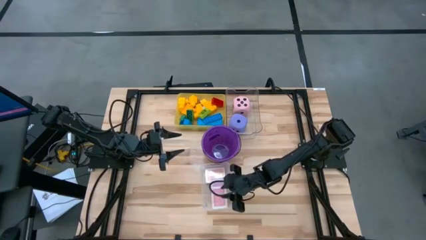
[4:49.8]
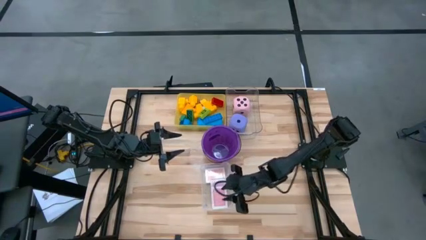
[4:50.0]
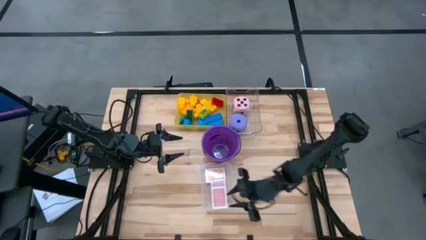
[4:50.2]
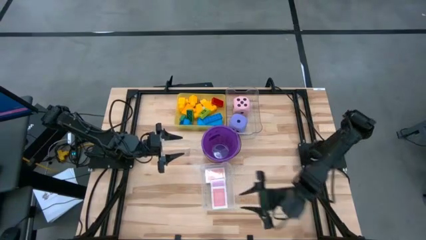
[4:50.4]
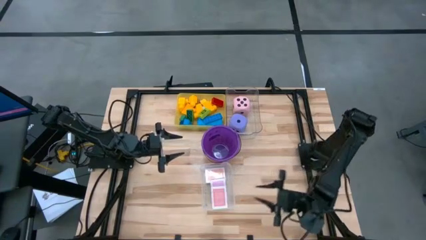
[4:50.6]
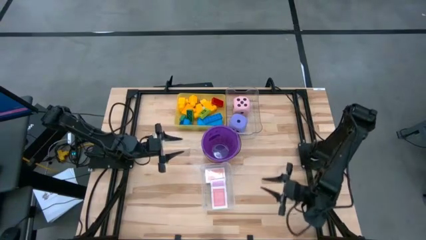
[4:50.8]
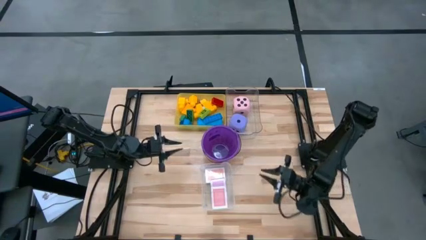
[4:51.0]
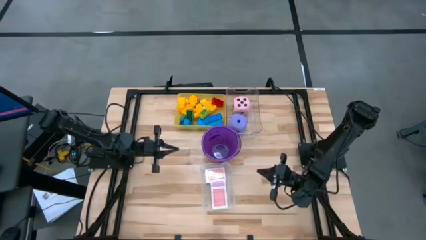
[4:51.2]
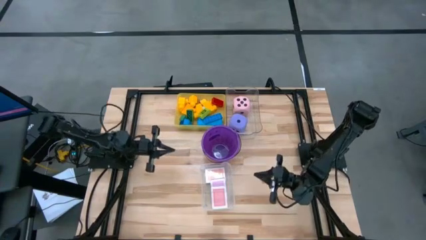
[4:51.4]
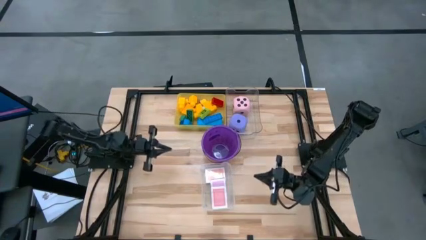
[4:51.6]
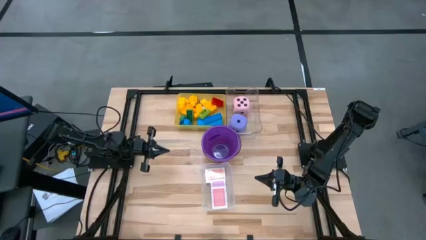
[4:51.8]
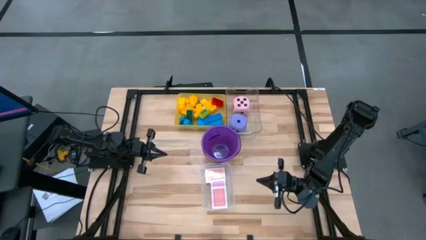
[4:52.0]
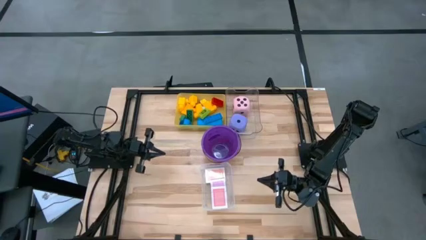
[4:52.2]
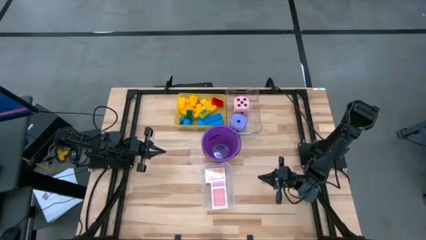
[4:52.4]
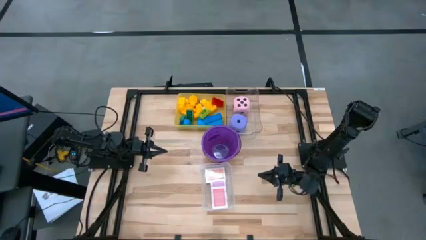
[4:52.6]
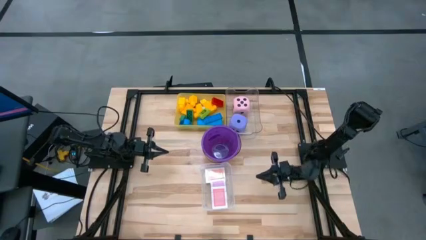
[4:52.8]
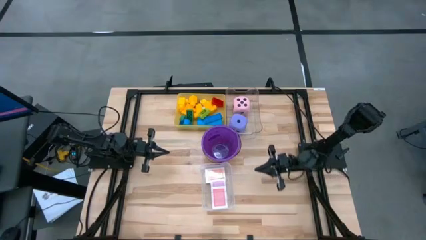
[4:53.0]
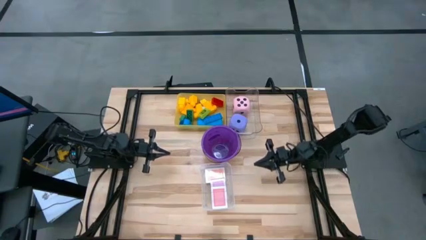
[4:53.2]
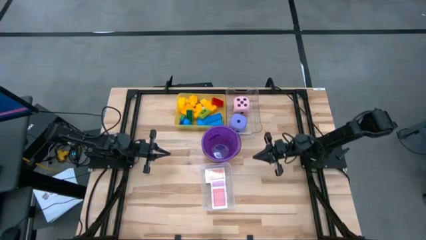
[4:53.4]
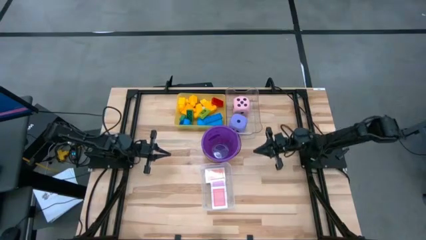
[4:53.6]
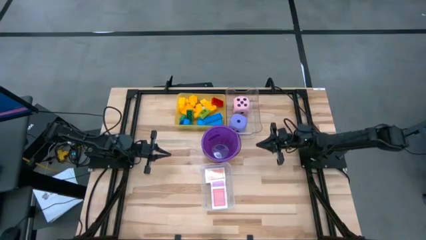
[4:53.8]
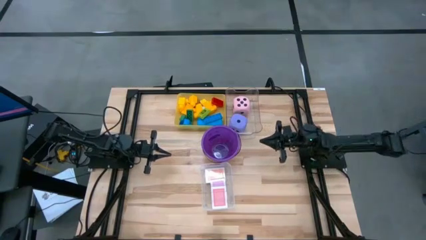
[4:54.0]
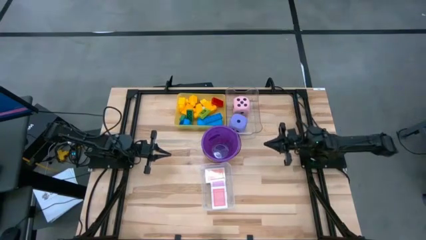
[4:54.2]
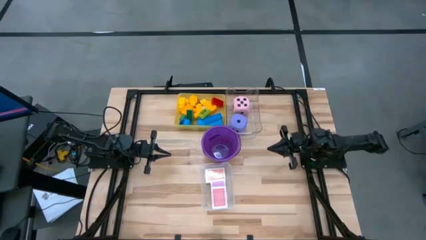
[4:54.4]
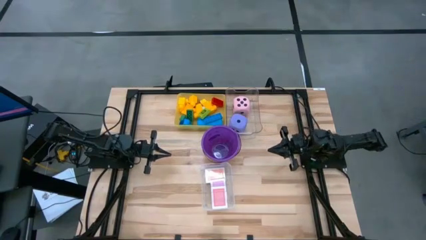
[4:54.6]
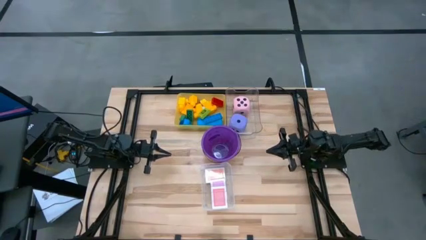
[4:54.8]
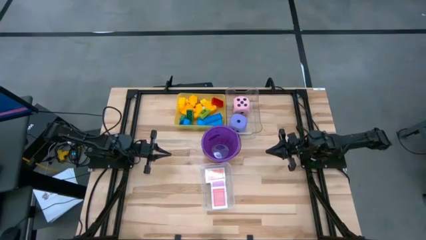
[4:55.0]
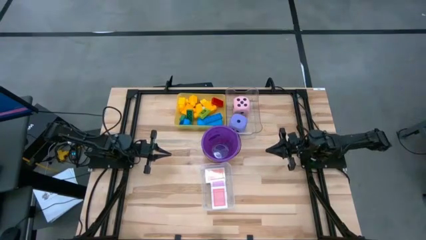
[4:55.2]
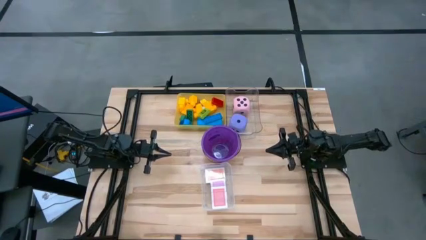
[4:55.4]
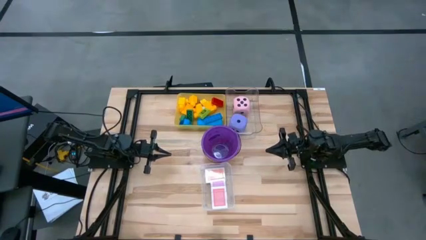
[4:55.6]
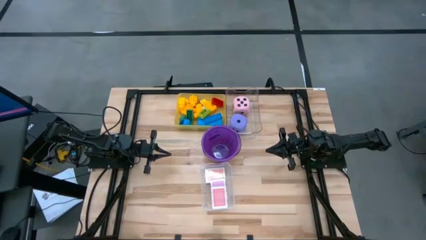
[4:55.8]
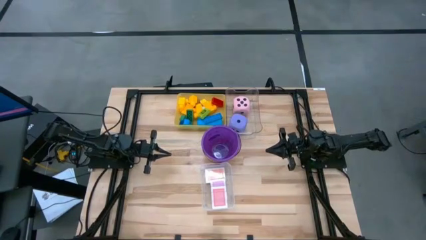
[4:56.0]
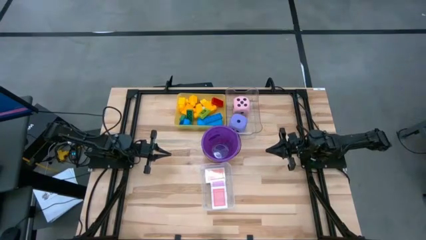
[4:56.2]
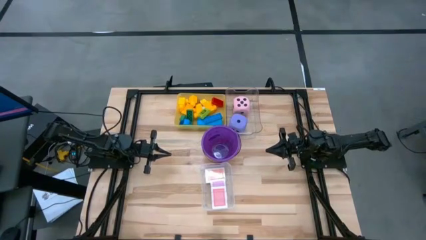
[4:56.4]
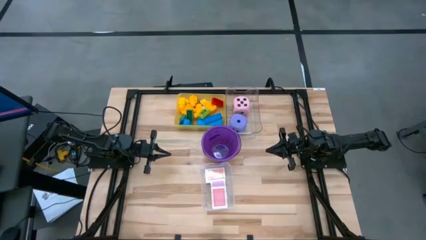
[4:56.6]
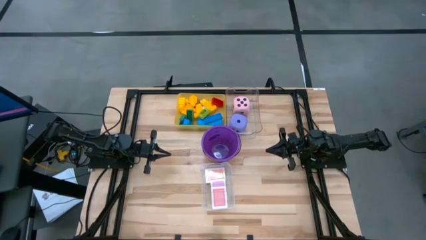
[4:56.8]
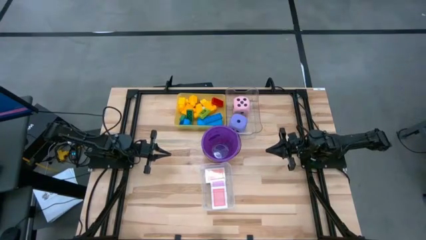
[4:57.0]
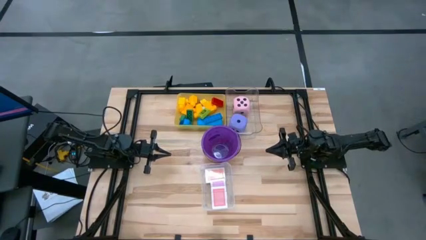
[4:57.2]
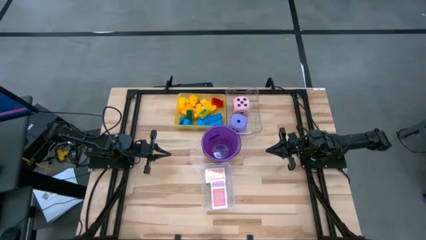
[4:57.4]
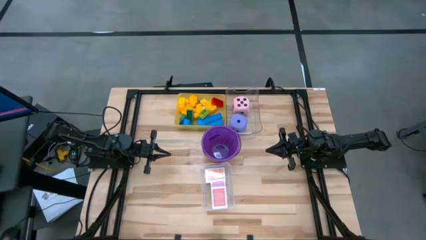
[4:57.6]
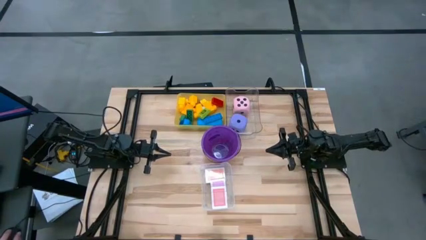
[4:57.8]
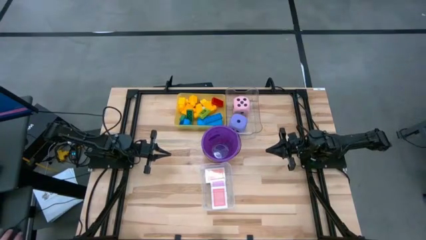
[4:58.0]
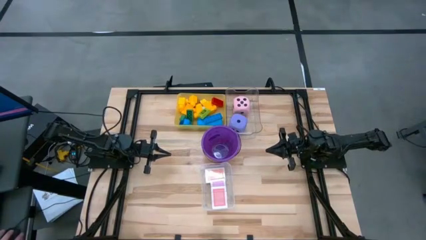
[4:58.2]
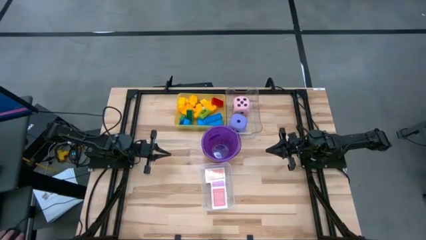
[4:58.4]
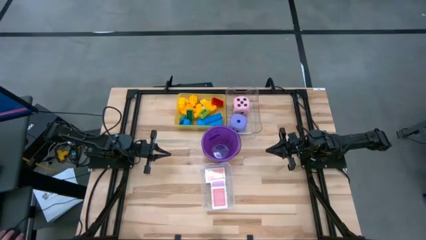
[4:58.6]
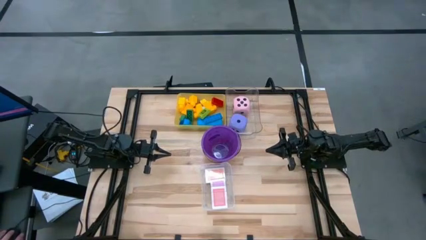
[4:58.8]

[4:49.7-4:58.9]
Task: Pick & Place Toys
Return to Home Position

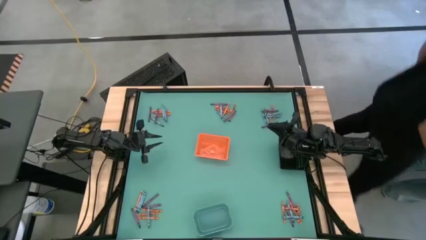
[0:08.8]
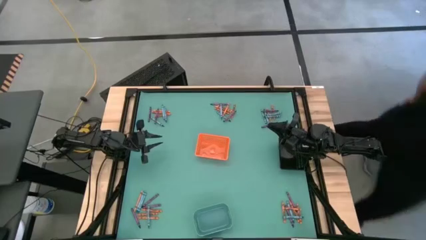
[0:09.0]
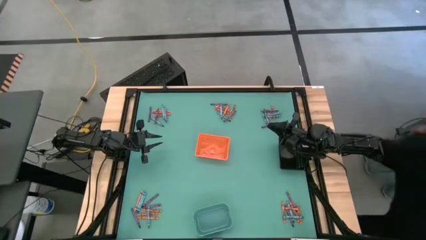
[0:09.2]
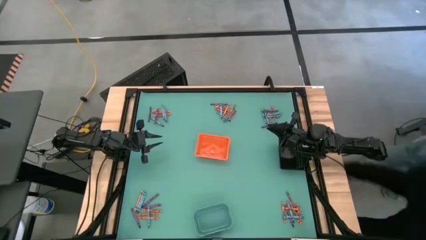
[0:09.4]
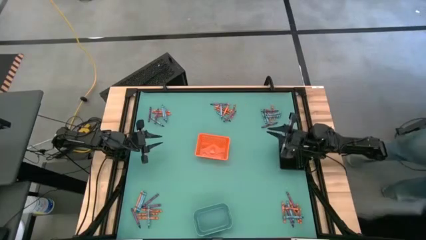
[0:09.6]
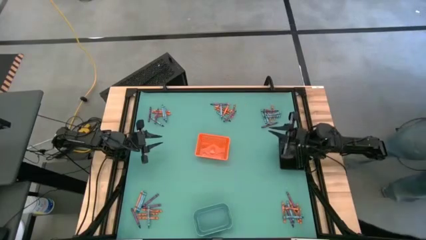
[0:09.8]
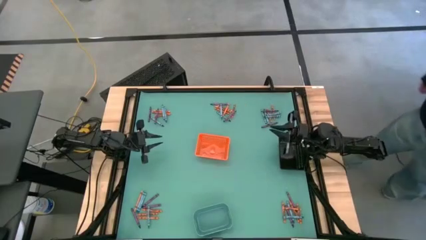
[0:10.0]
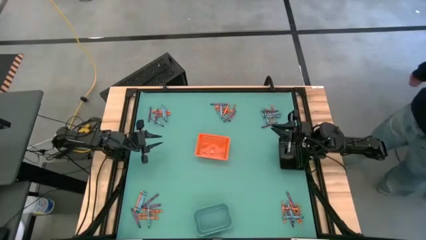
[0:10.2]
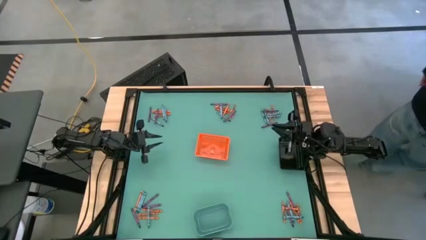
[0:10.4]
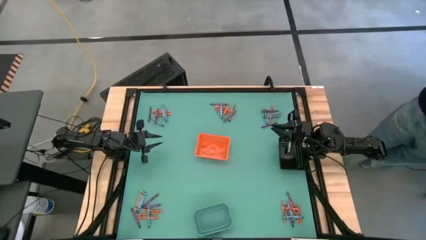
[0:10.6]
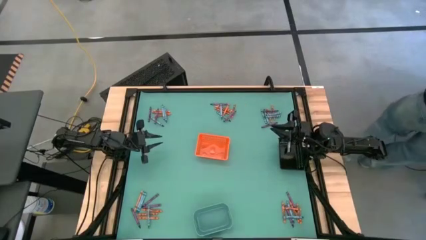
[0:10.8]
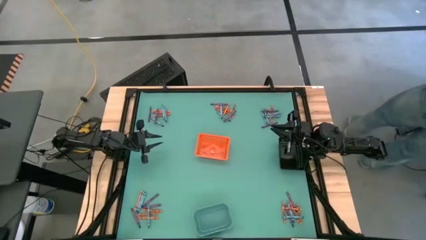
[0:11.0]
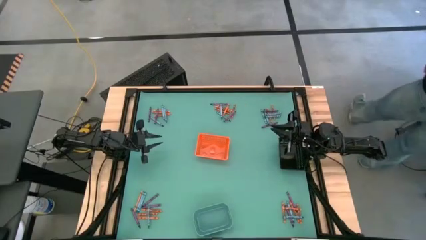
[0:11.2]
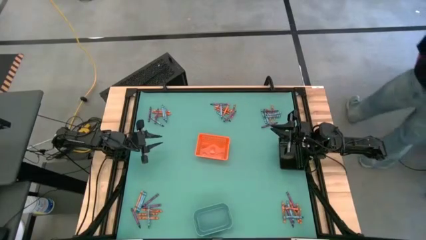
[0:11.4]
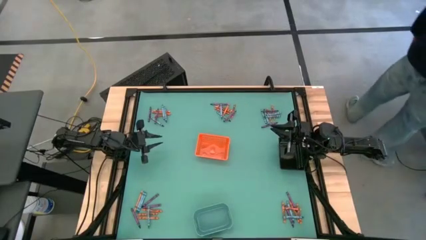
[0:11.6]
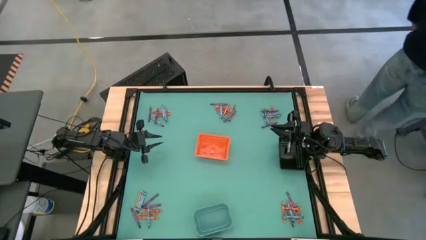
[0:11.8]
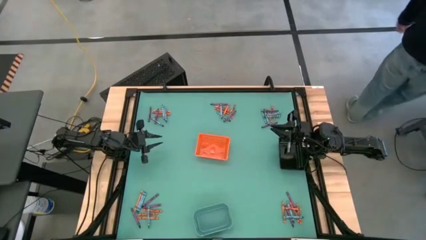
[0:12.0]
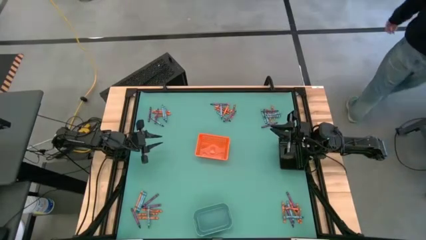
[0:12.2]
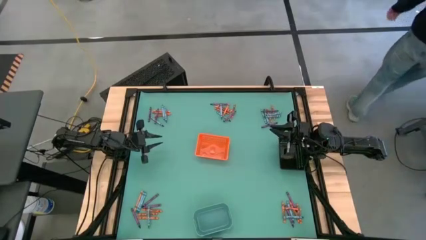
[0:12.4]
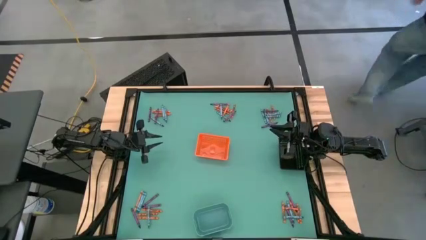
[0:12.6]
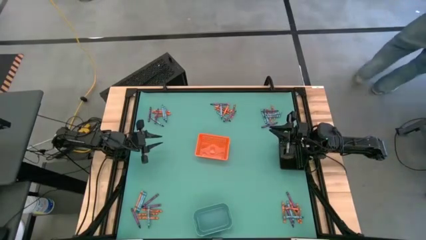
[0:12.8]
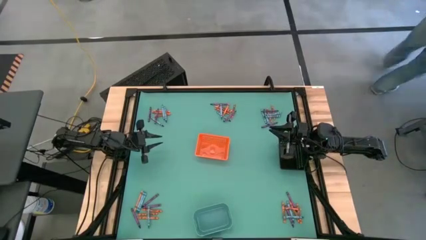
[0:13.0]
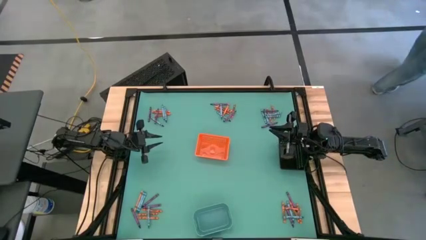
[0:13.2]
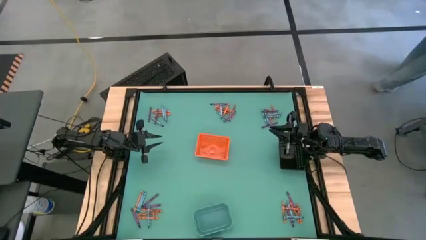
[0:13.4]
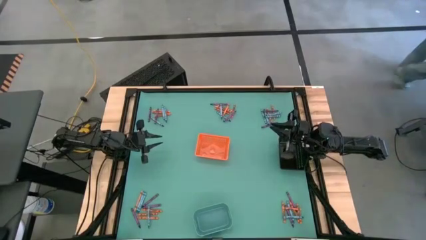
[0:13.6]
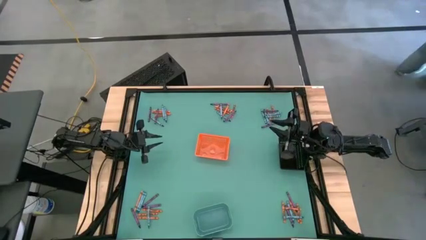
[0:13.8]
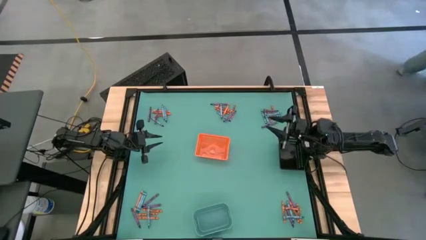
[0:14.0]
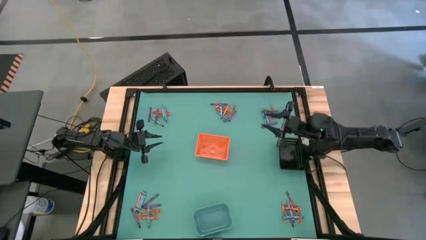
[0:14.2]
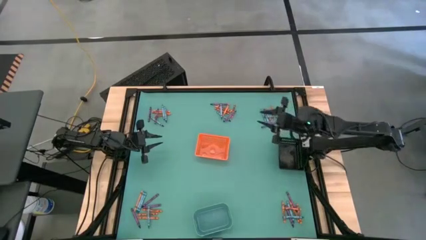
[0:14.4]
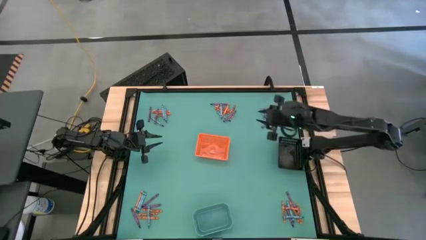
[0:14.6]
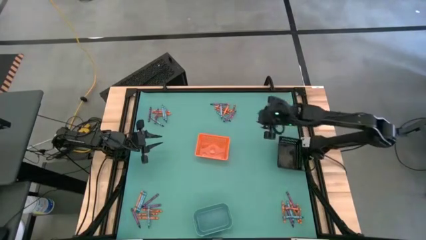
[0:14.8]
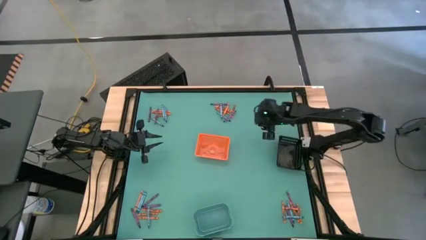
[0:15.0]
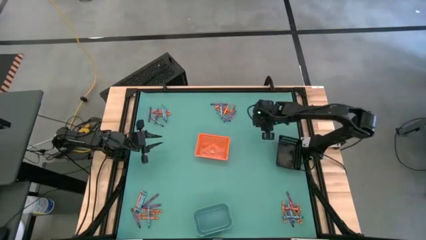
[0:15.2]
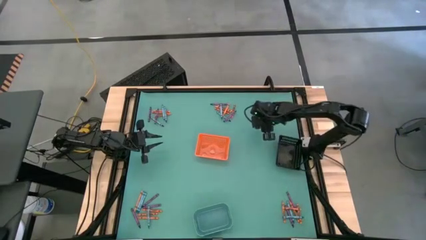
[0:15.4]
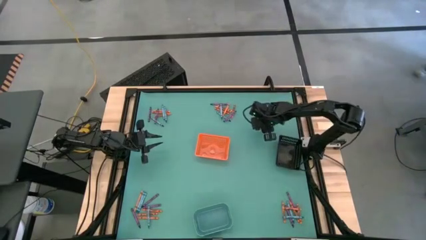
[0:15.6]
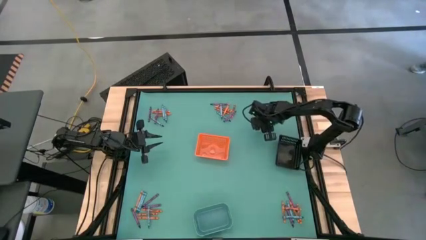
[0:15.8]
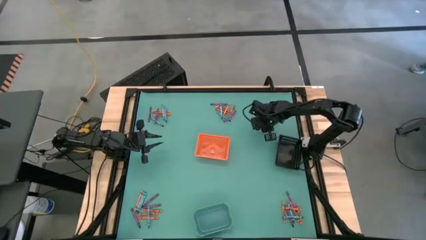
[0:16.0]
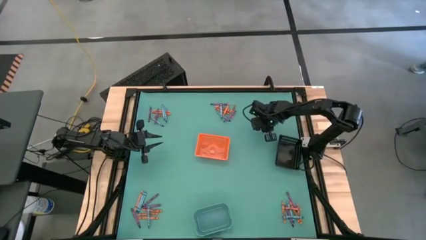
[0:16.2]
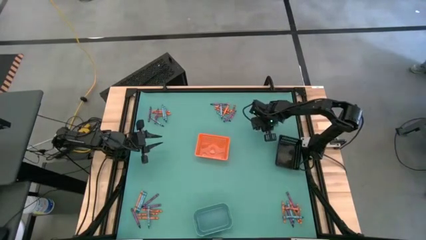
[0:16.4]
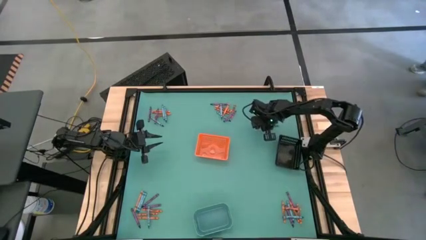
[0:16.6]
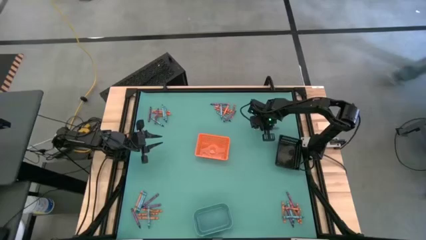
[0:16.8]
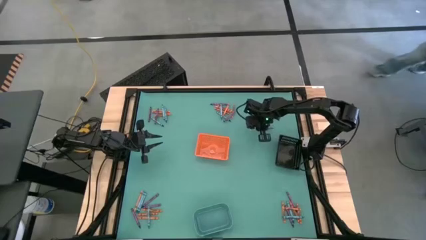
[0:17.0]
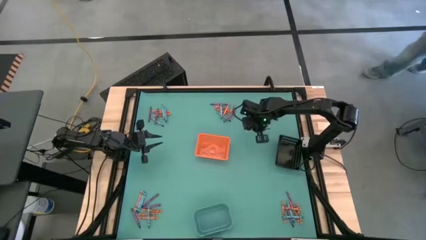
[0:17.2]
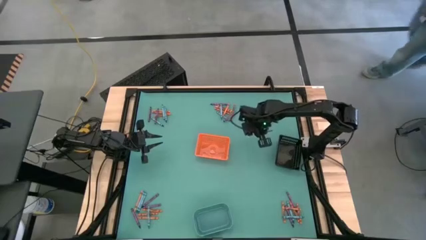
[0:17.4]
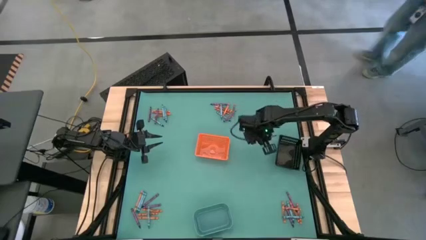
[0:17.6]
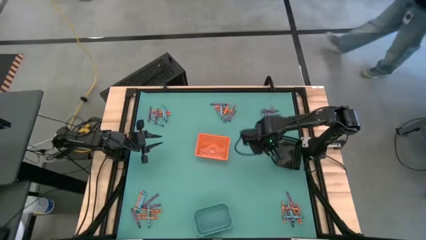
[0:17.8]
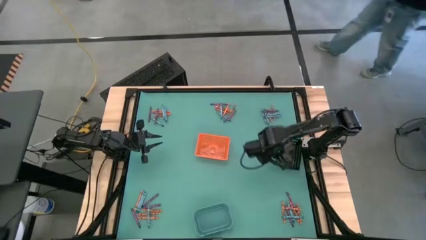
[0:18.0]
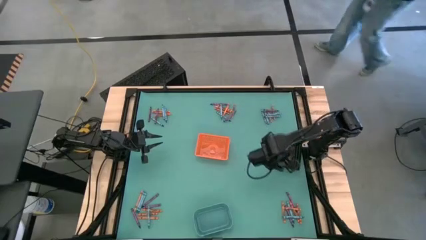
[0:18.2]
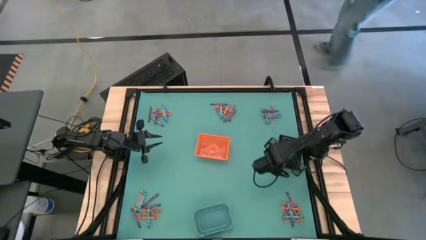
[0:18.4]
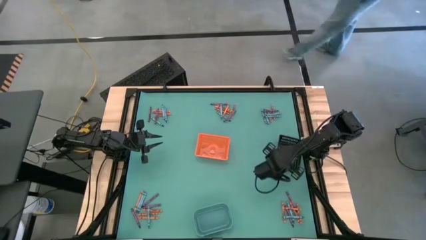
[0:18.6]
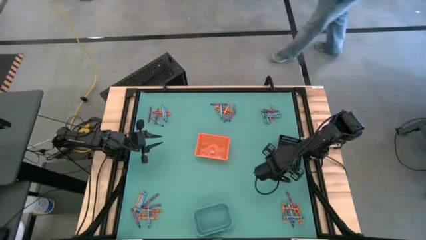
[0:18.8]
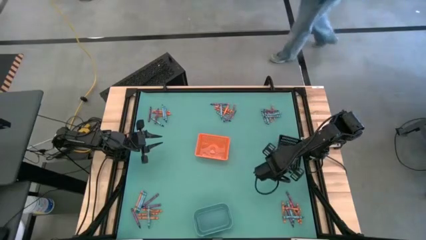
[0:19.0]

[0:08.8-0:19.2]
Task: Sort crayons
Put the purple crayon into the black bin
